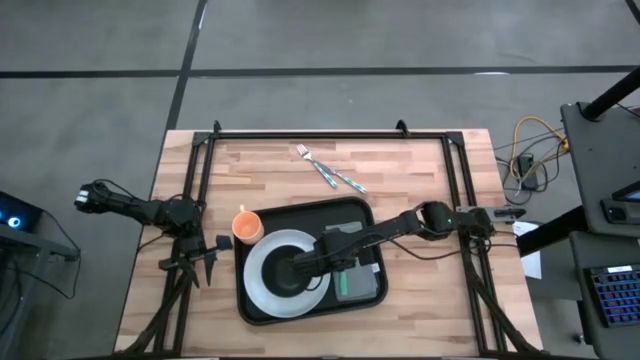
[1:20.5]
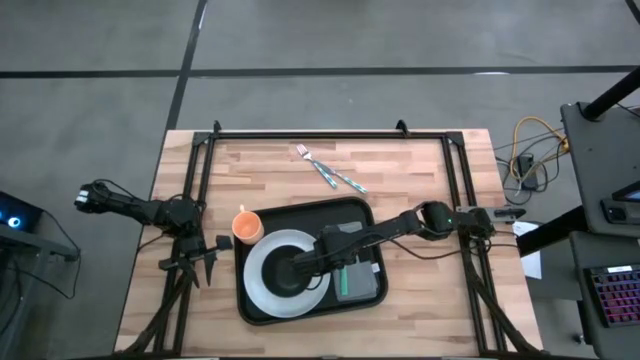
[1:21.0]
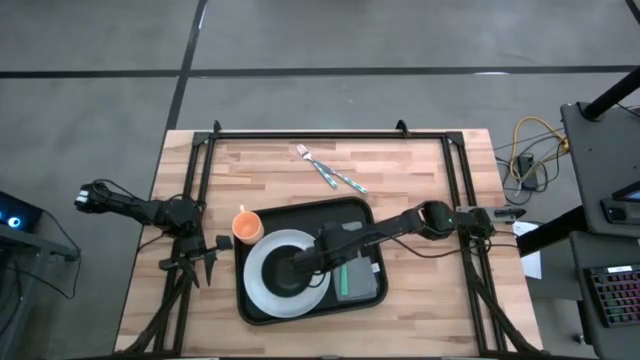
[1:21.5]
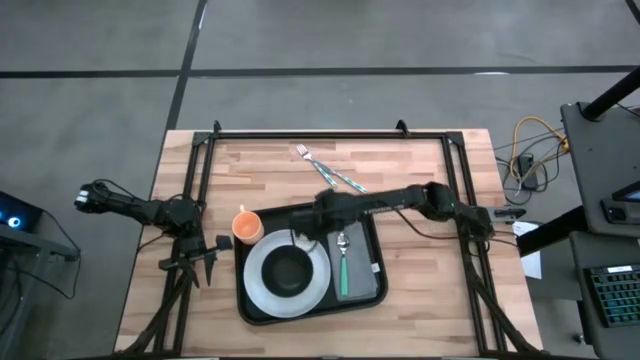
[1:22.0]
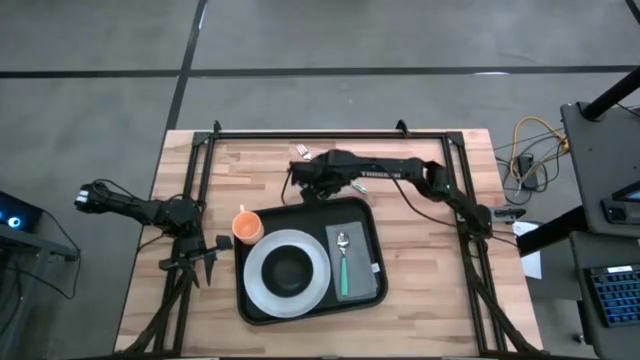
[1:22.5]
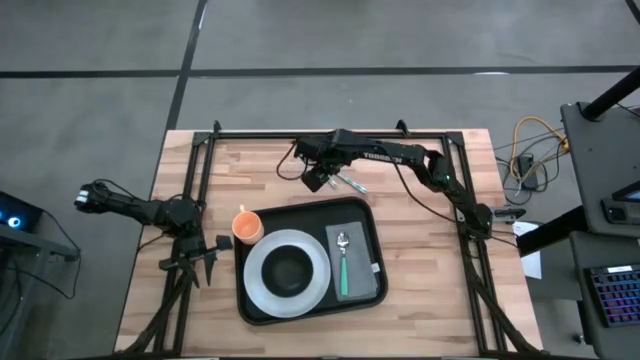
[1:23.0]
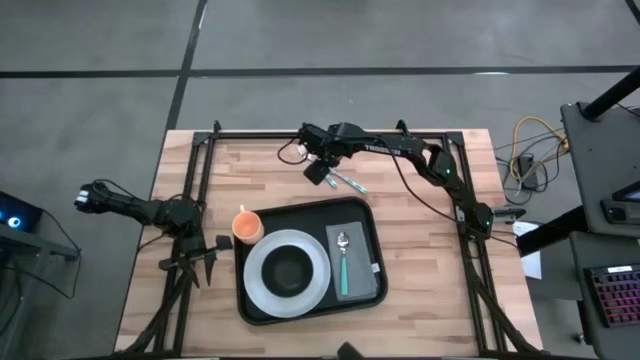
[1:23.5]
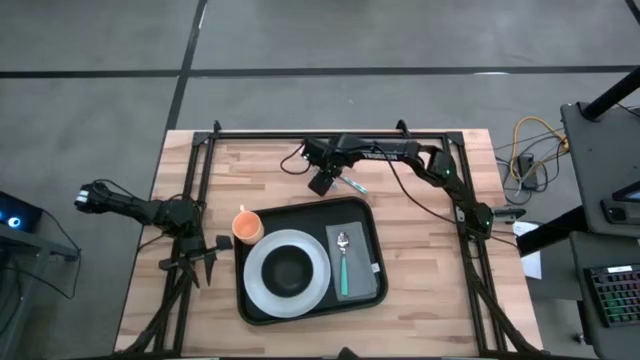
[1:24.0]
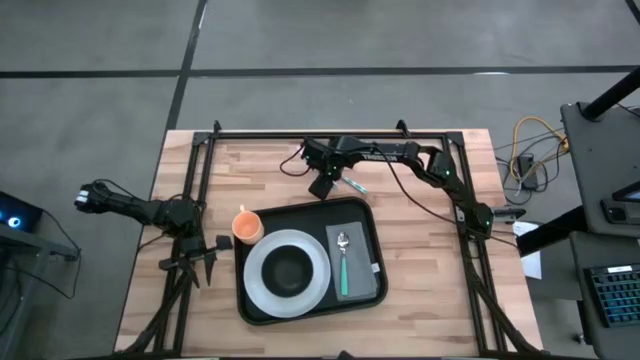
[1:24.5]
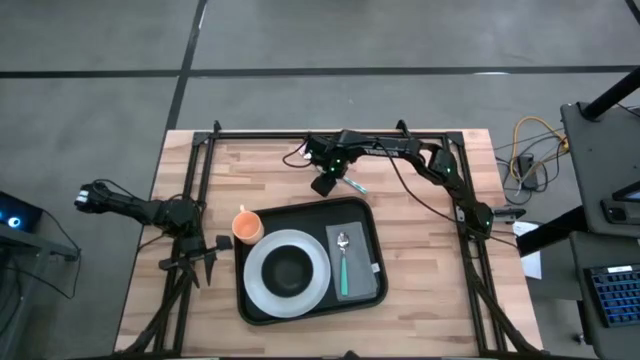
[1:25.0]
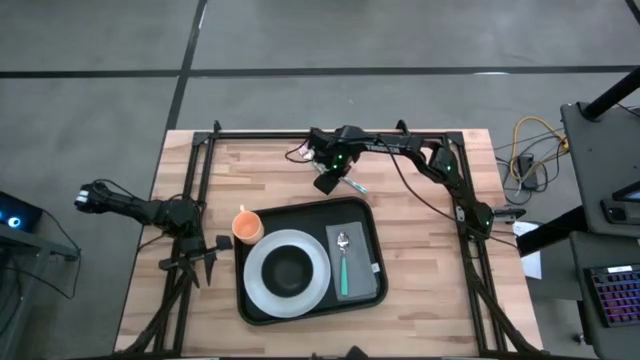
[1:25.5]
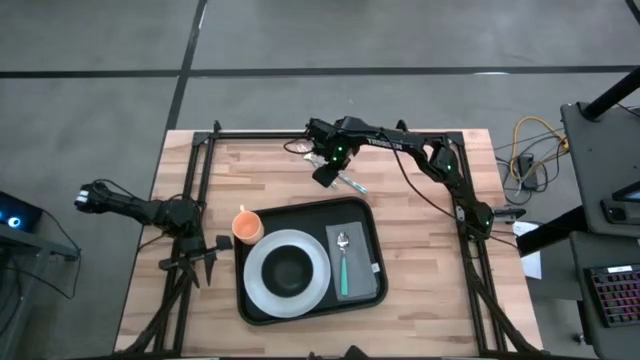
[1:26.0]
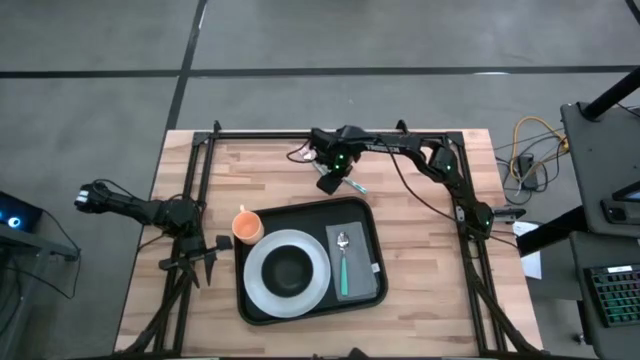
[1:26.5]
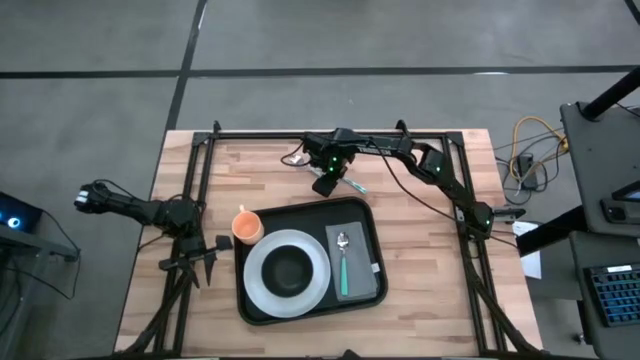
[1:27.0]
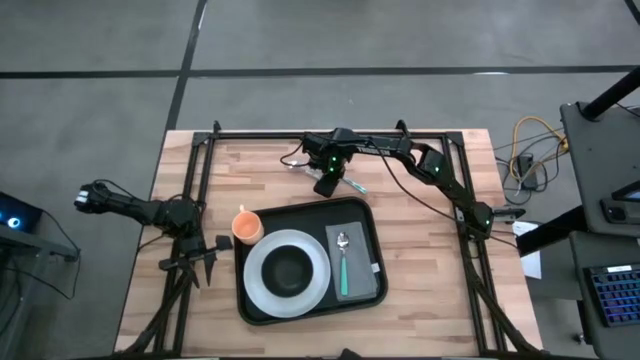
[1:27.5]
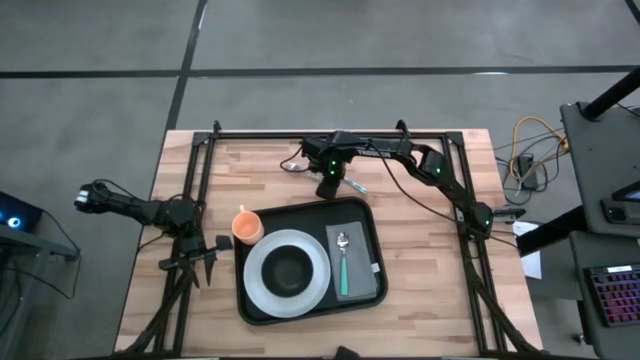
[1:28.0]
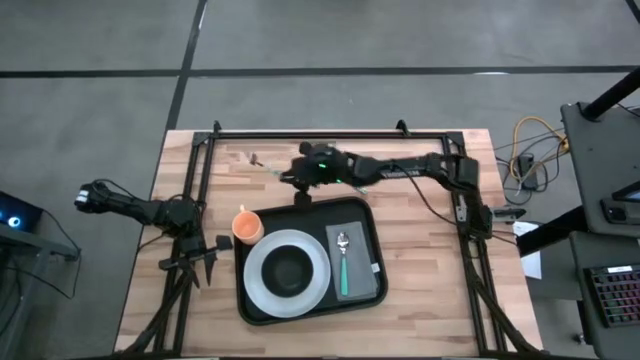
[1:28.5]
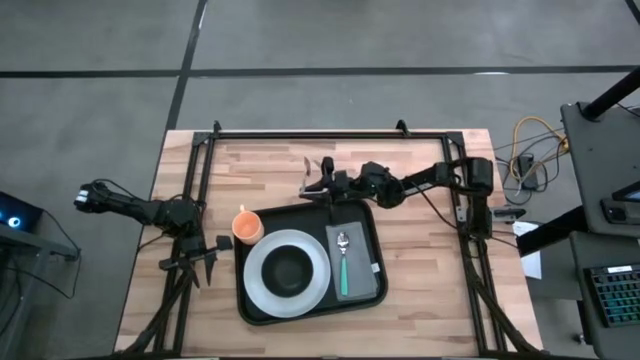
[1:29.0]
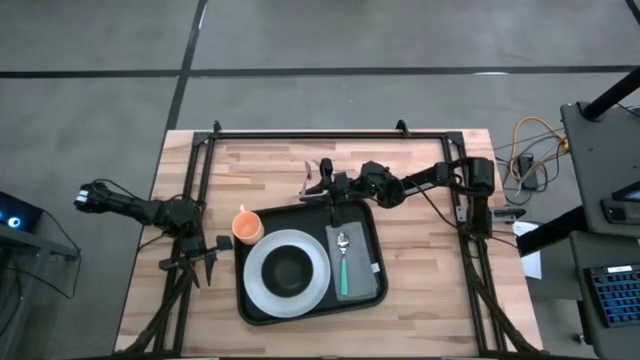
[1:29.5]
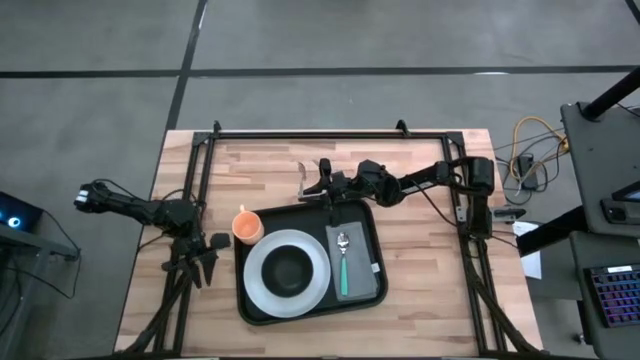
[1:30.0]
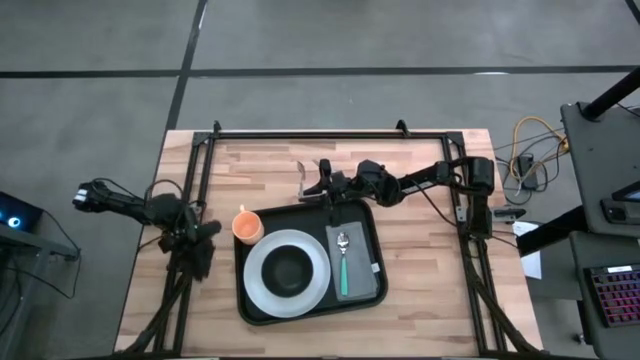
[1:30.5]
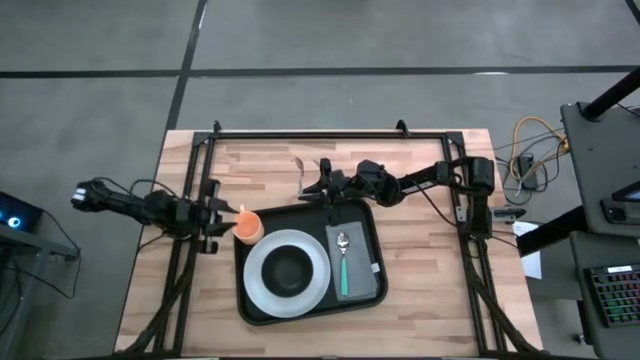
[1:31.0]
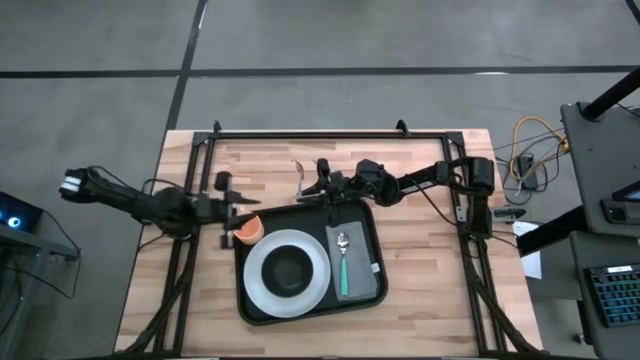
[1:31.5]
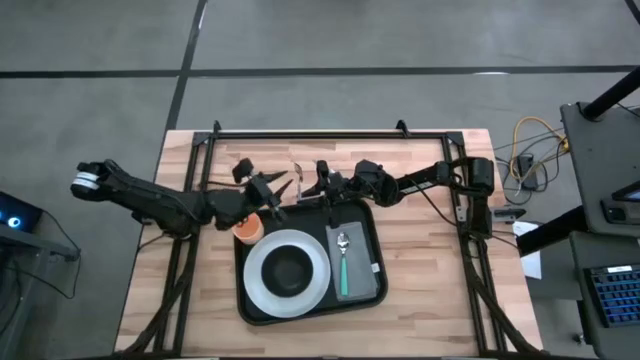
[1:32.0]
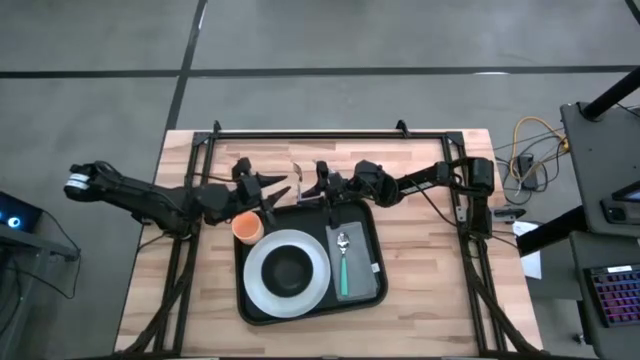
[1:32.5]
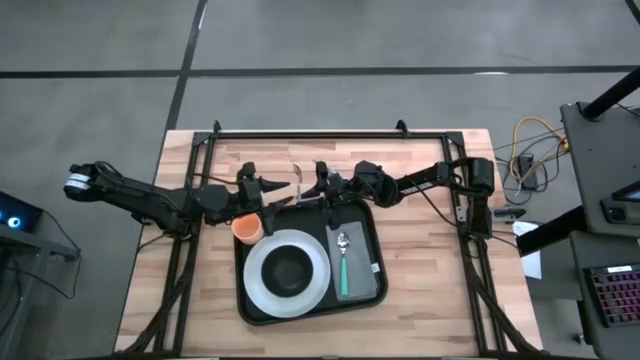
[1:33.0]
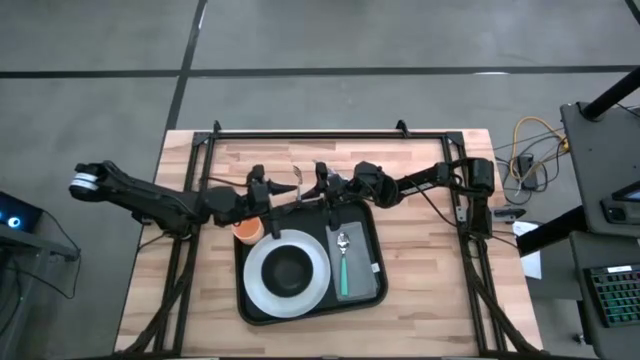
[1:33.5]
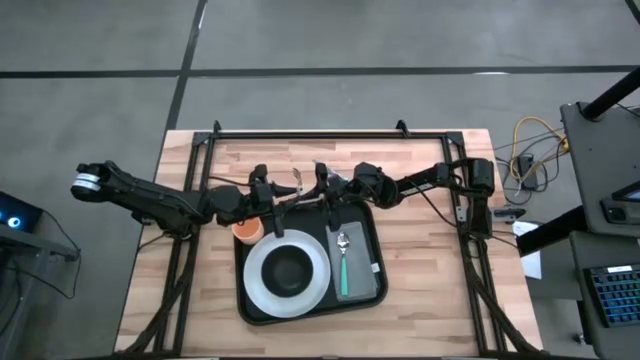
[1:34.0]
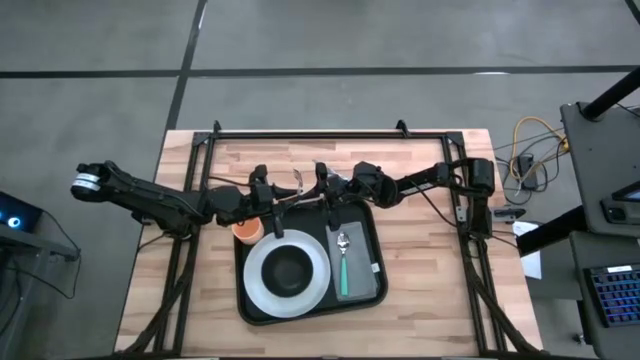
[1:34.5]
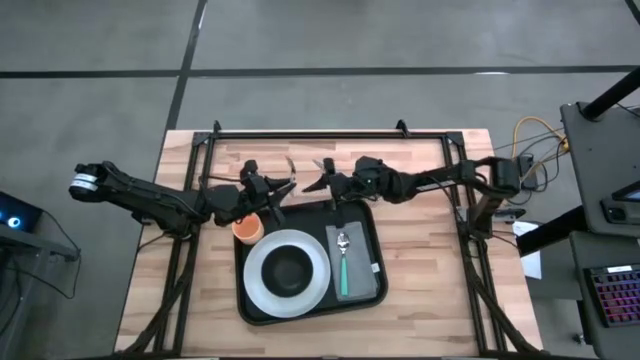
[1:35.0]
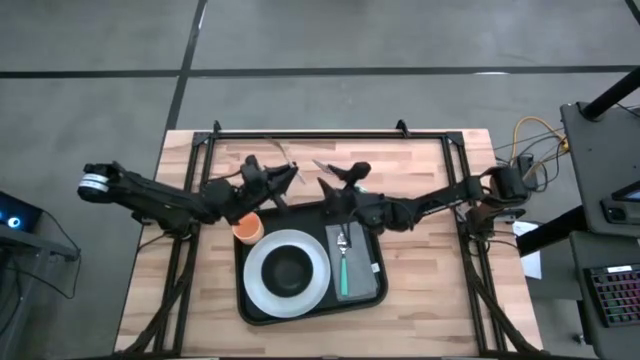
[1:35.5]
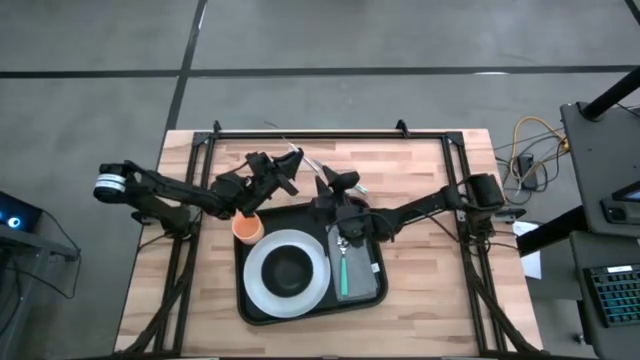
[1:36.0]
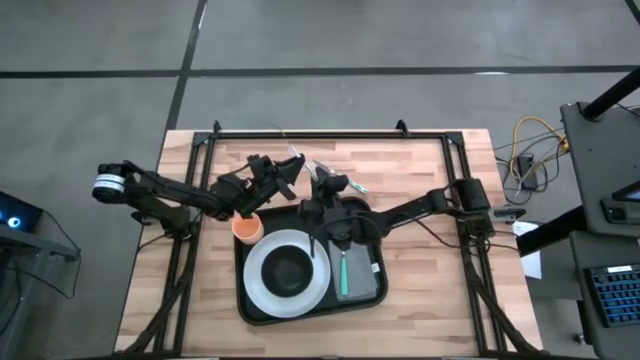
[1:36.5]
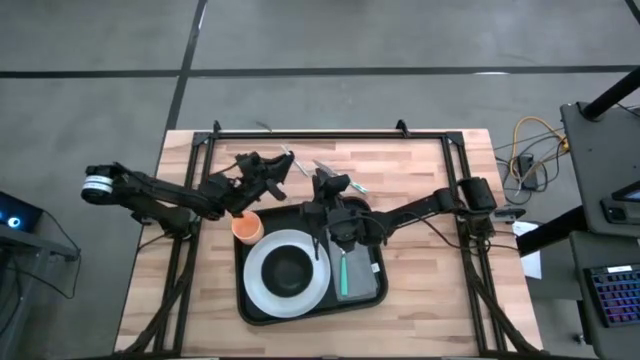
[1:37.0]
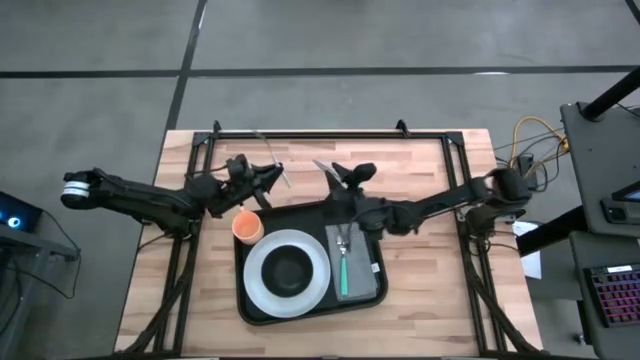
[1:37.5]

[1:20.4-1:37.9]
Task: Set up tray
Put the blue and white fork on the gray table napkin to the right of the blue spoon

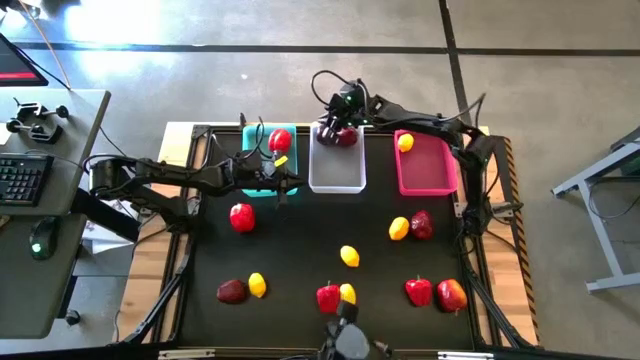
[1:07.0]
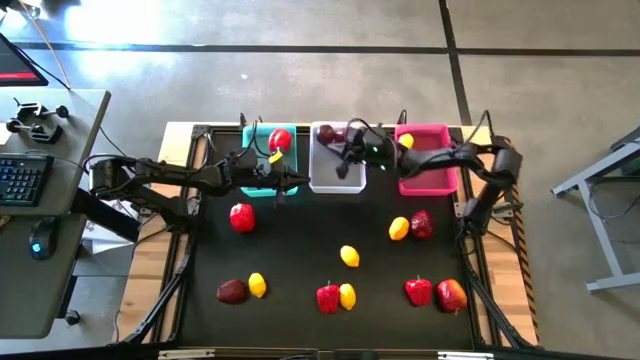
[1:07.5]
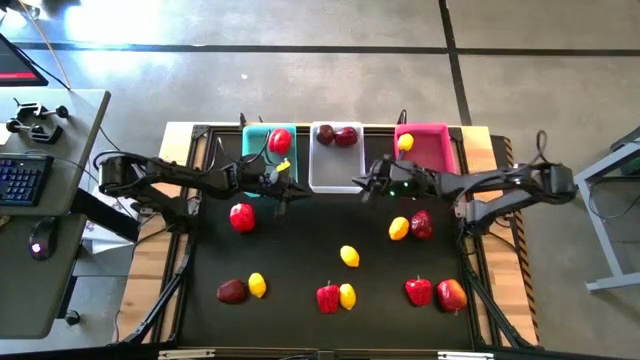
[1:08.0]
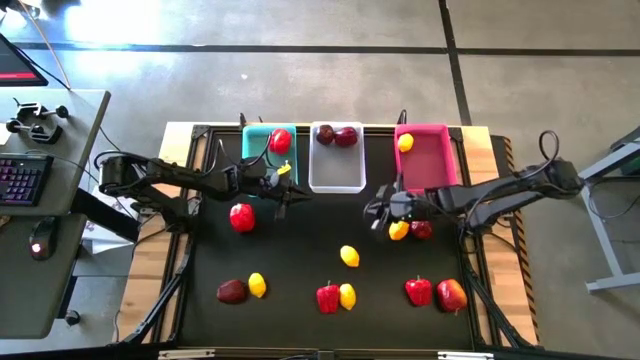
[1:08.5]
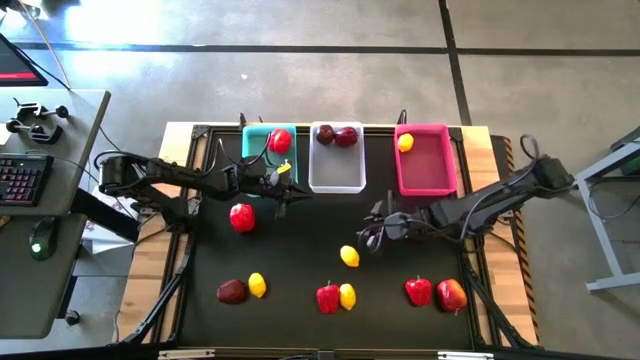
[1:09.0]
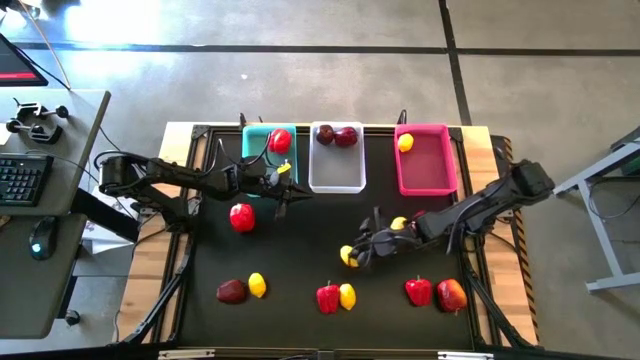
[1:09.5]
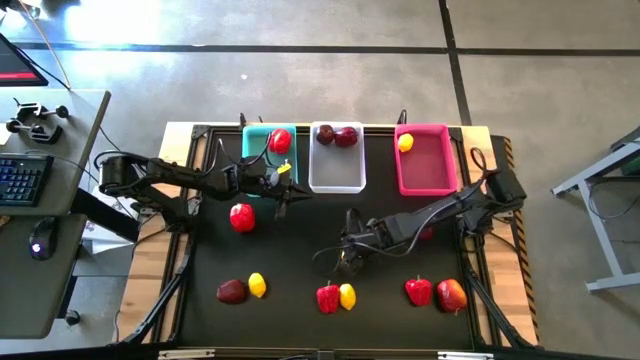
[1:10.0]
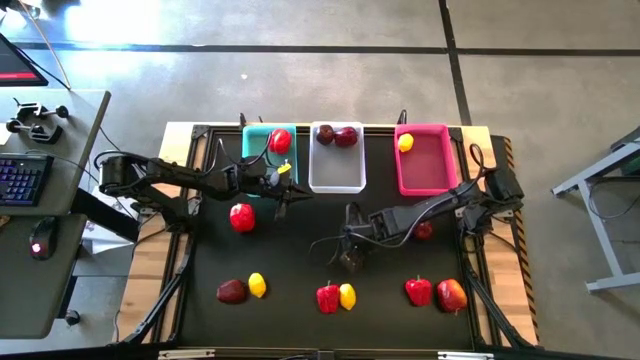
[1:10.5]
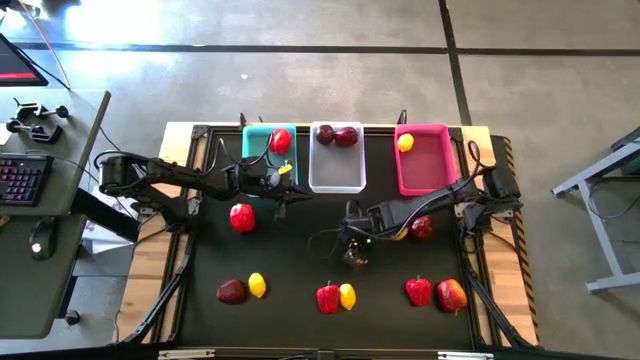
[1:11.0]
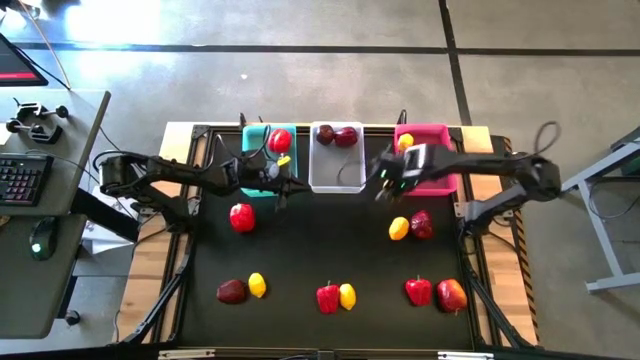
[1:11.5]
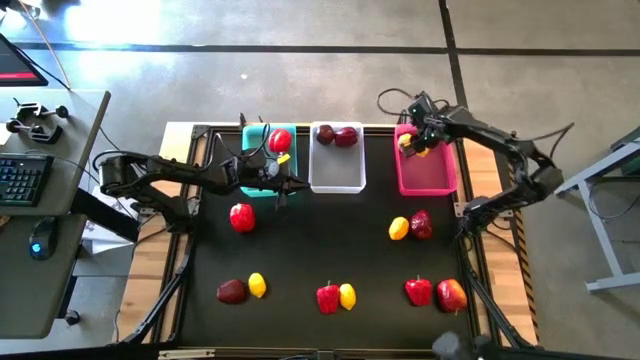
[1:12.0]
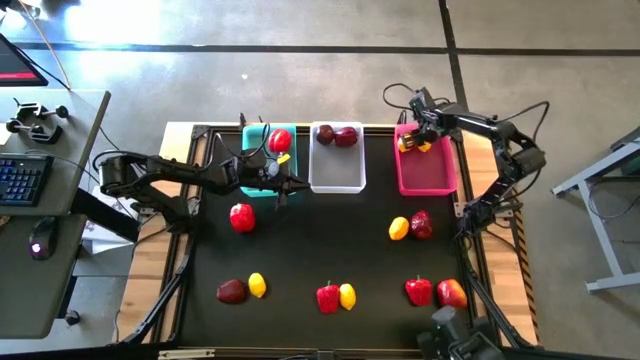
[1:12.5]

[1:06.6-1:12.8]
Task: Sort produce into baskets
Put the lemon into the pink bin
